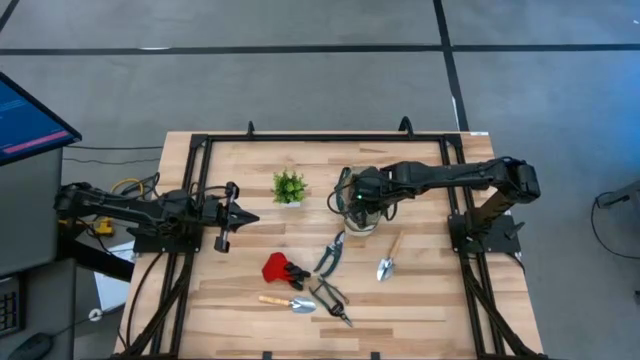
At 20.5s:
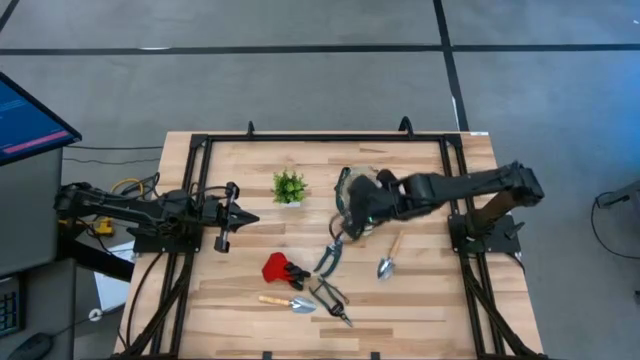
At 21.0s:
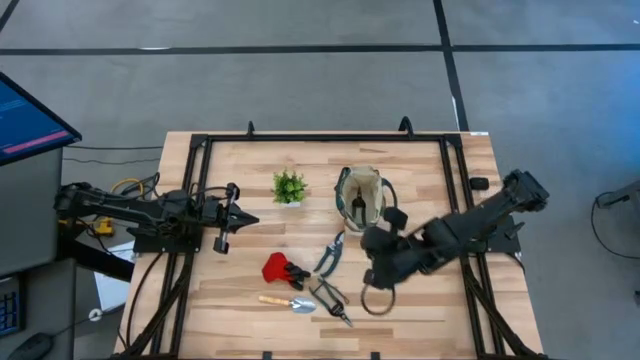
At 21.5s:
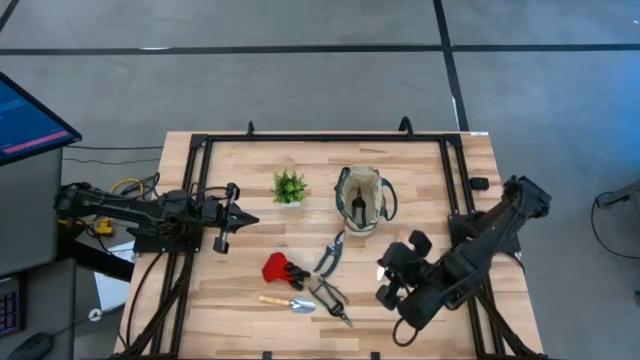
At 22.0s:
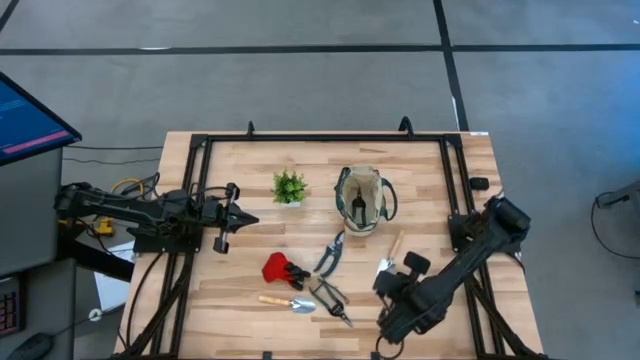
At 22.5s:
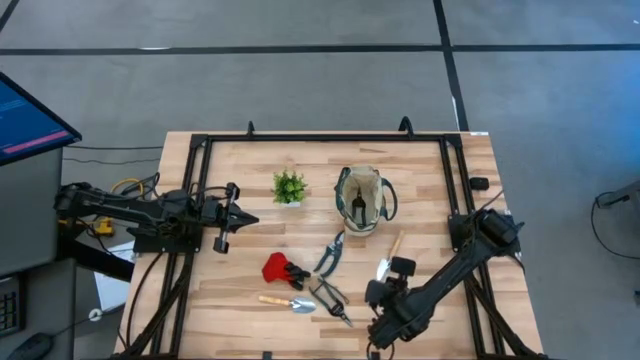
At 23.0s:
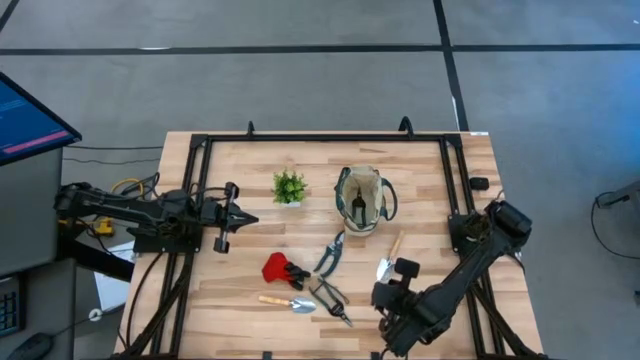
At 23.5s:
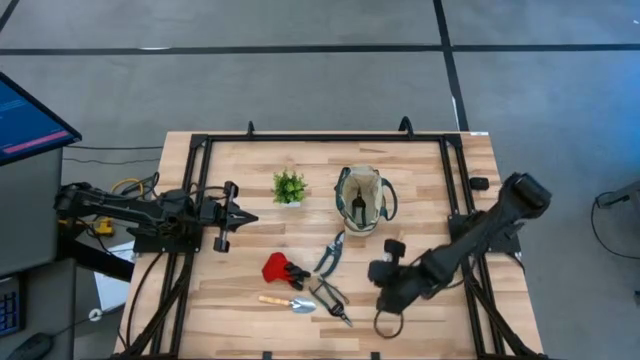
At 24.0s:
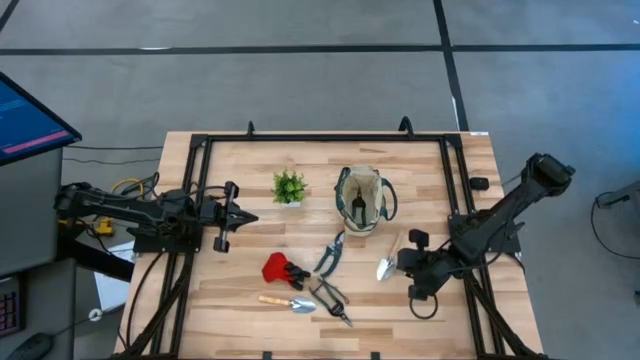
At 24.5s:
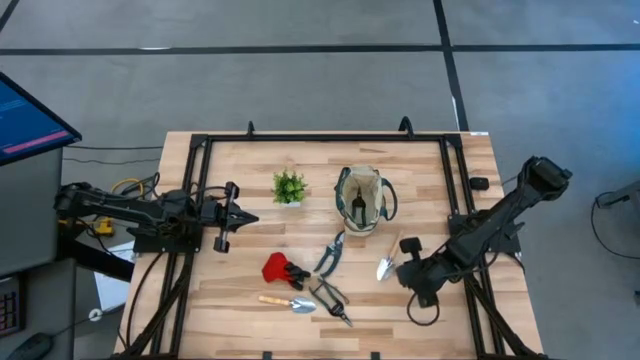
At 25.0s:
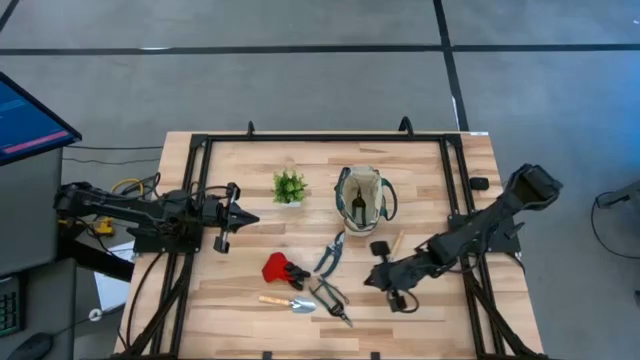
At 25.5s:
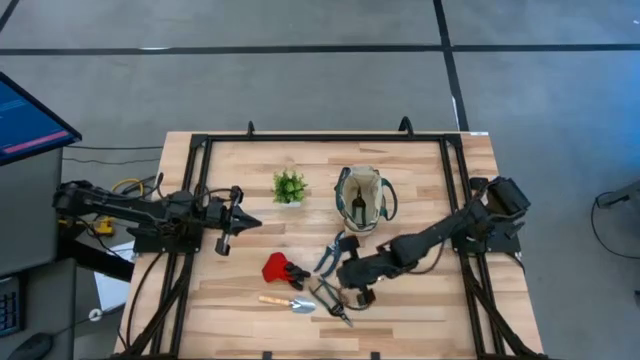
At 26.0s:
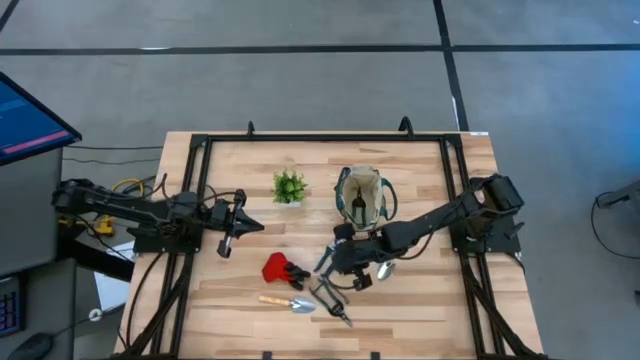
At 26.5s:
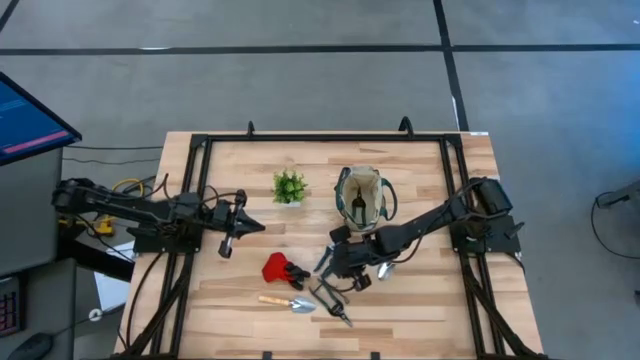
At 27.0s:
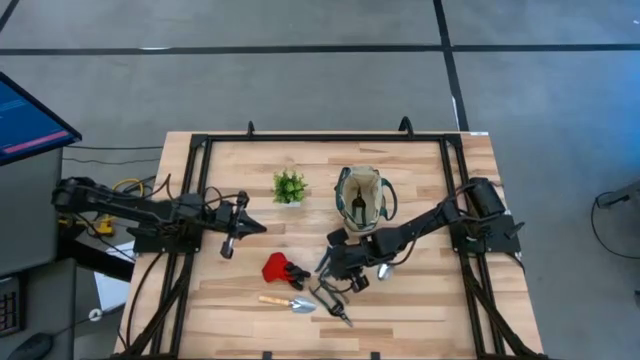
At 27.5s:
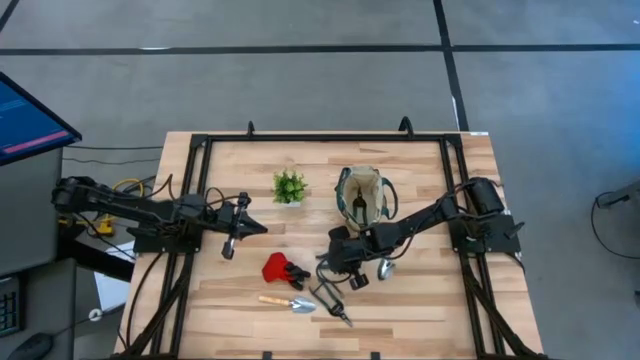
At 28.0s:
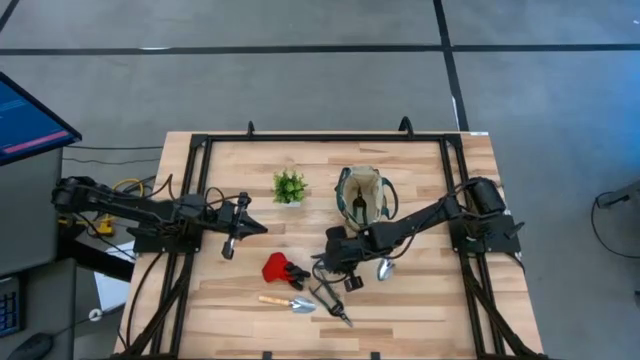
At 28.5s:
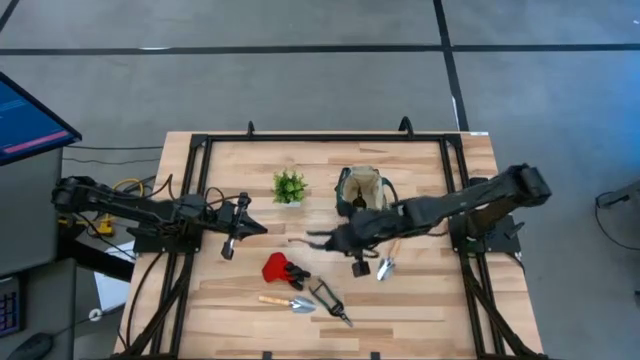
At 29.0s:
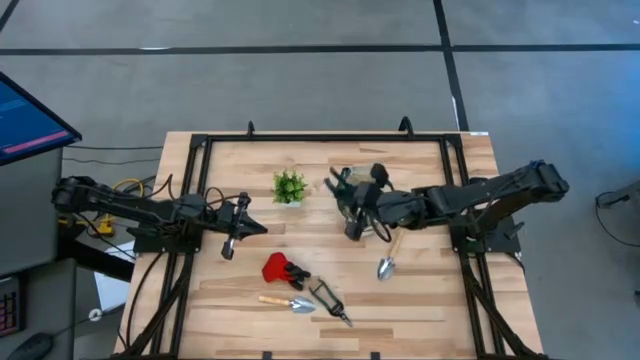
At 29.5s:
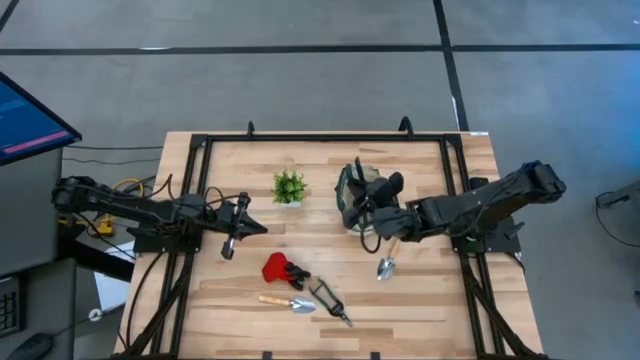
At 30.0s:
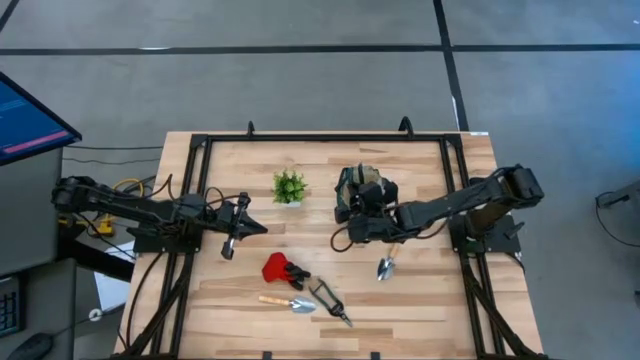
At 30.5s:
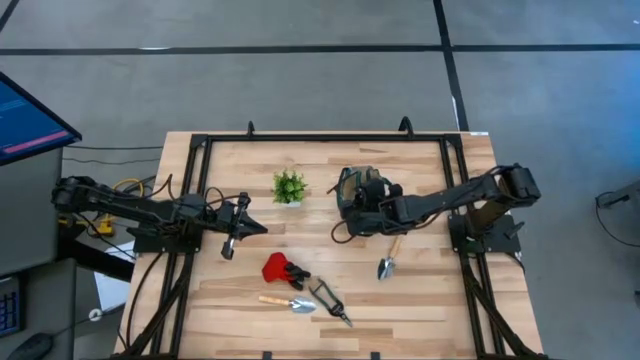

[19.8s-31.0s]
Task: Pick & Place Garden tools in Gardening bag
Put the green shear scissors into the white gardening bag

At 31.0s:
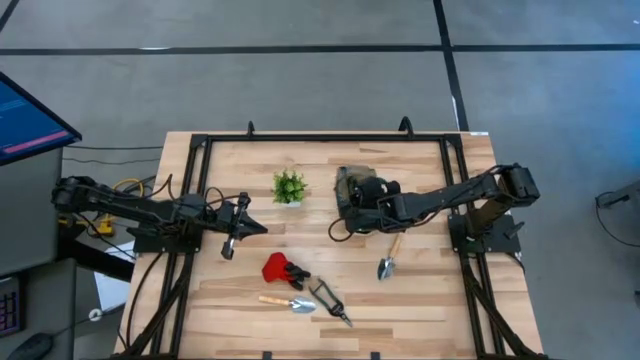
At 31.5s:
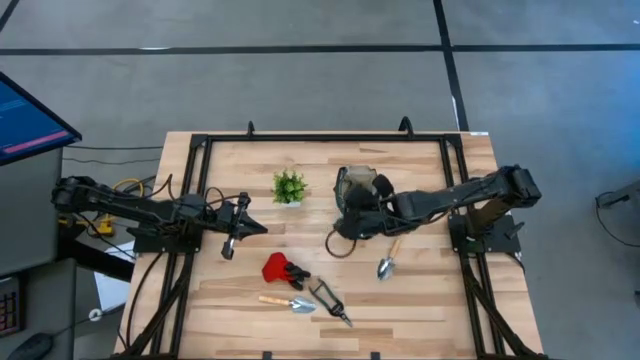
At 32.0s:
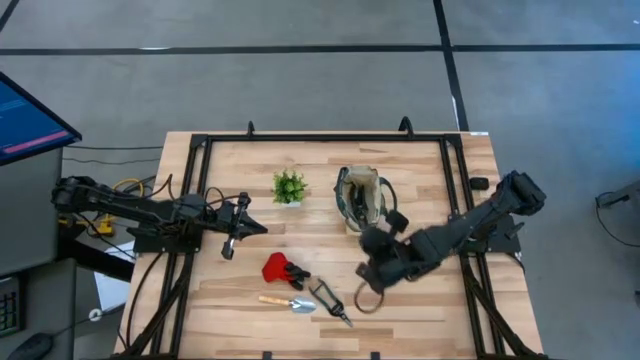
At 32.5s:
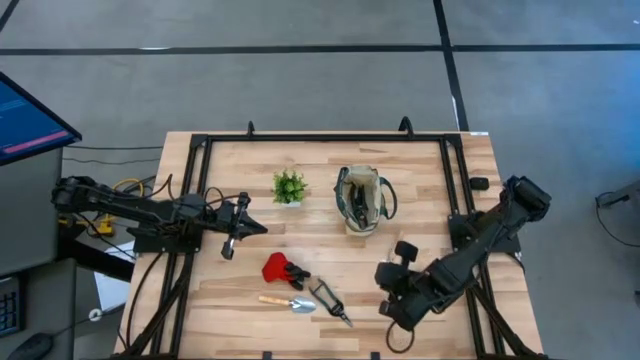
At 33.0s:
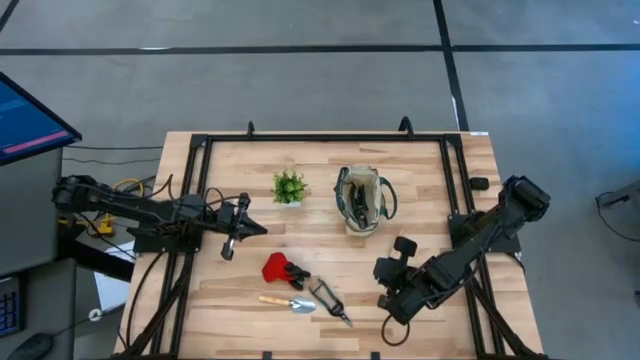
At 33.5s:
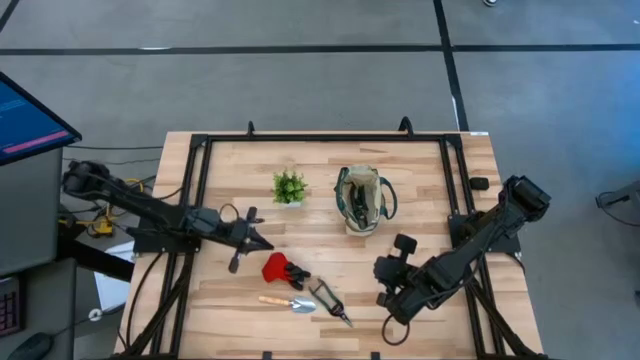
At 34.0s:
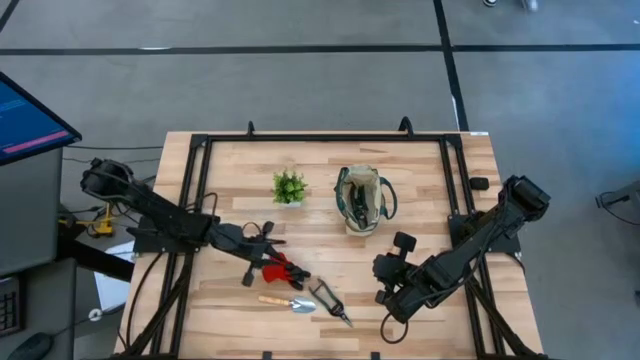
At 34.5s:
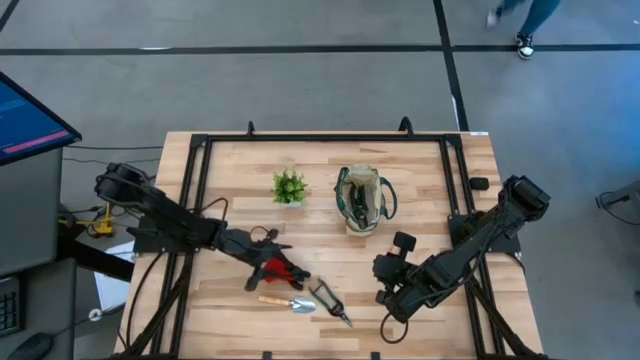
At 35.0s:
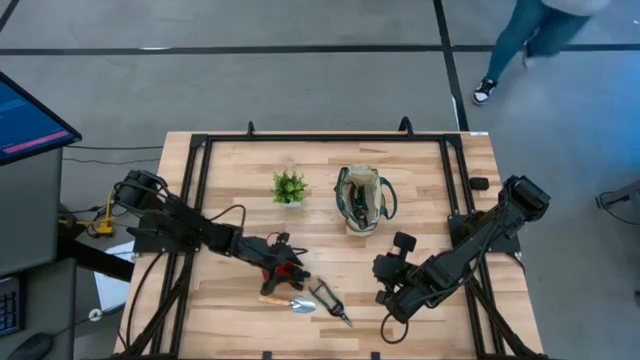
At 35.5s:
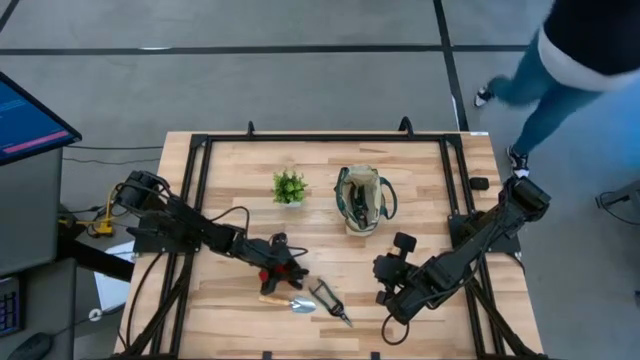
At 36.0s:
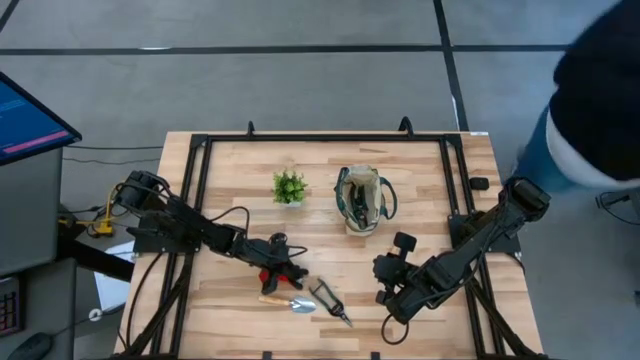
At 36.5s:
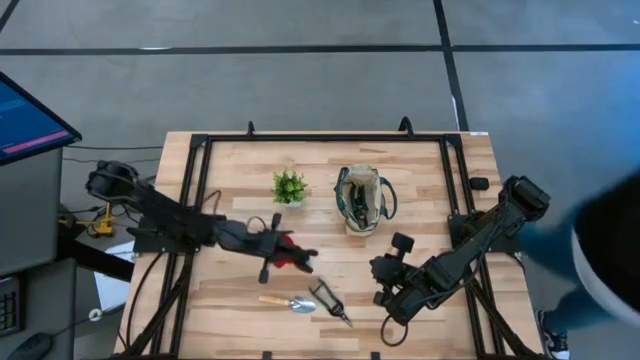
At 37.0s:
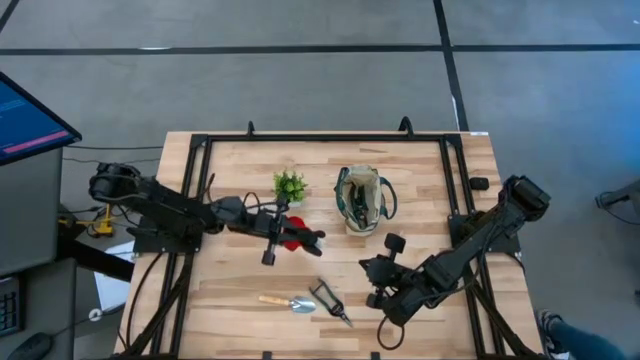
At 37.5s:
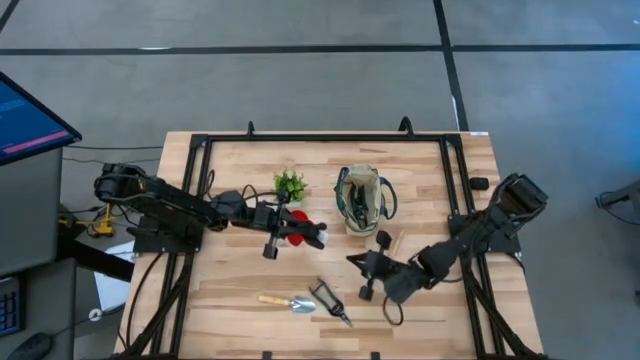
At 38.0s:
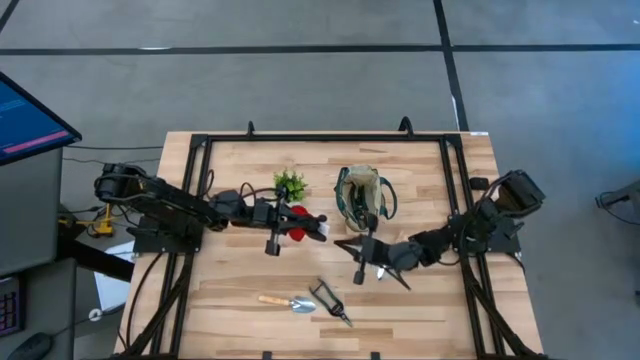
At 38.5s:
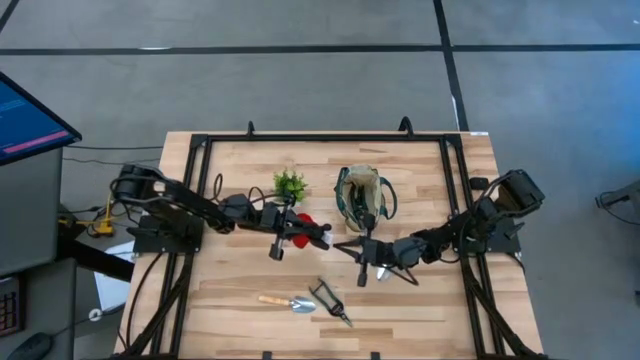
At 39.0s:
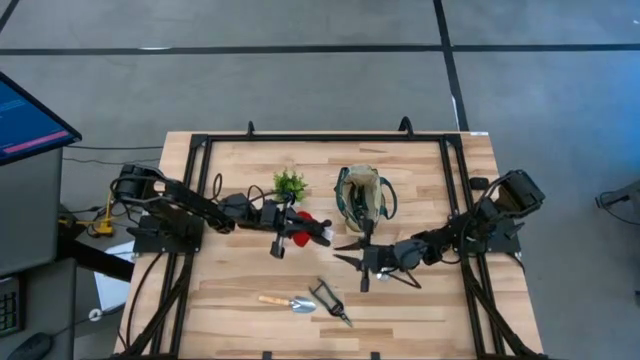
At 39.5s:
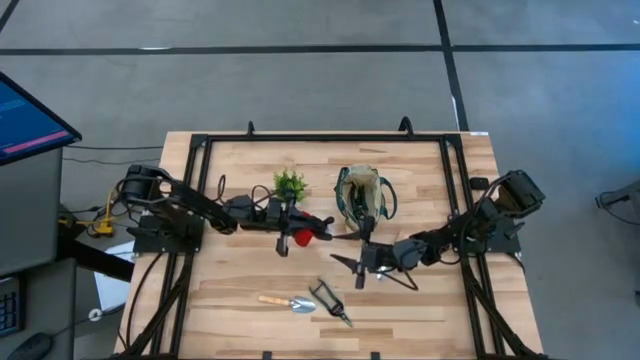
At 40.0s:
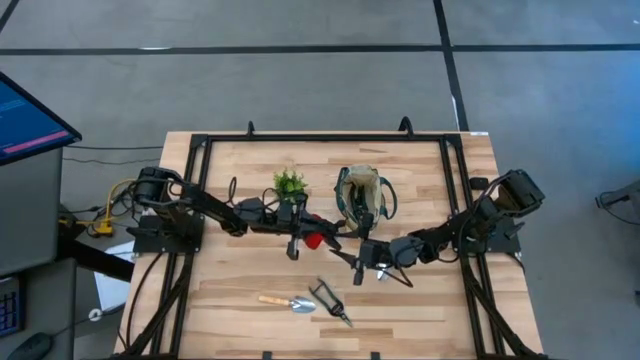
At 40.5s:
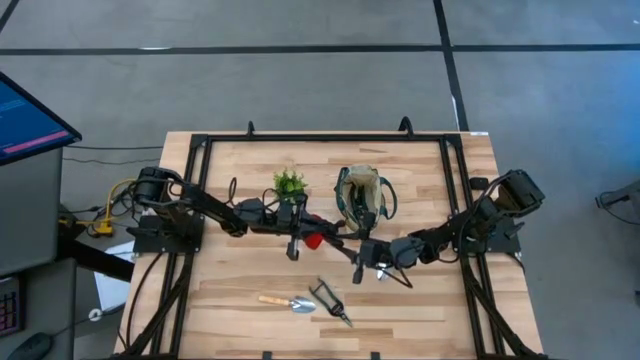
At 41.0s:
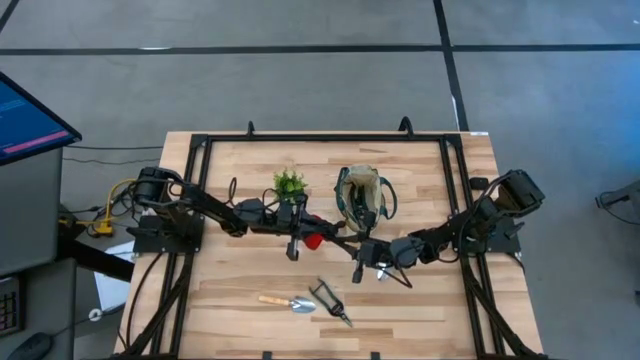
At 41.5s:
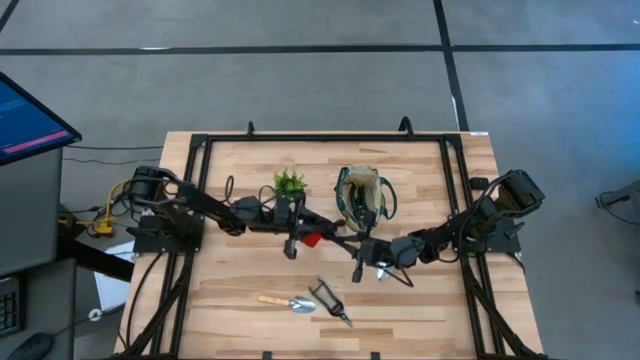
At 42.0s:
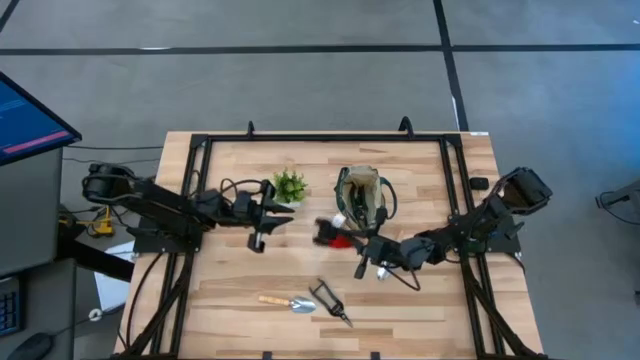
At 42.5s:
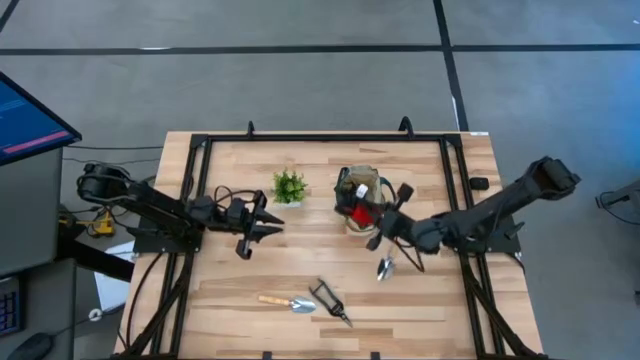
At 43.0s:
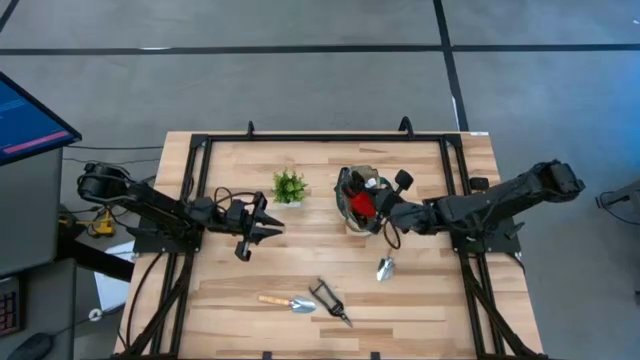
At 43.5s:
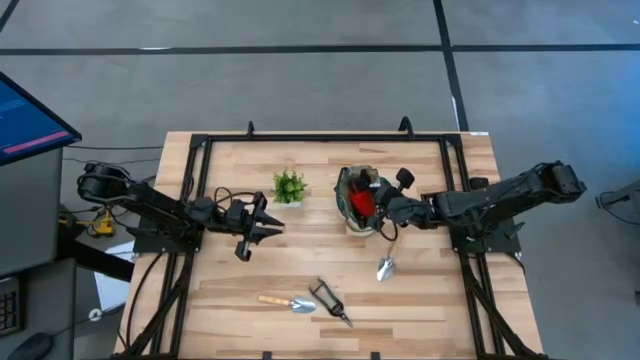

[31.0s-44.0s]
Put the red gloves into the white gardening bag
